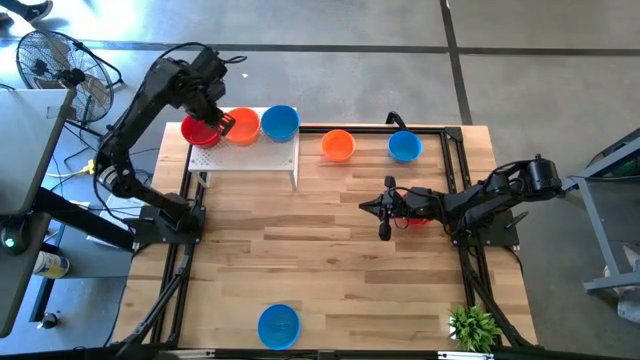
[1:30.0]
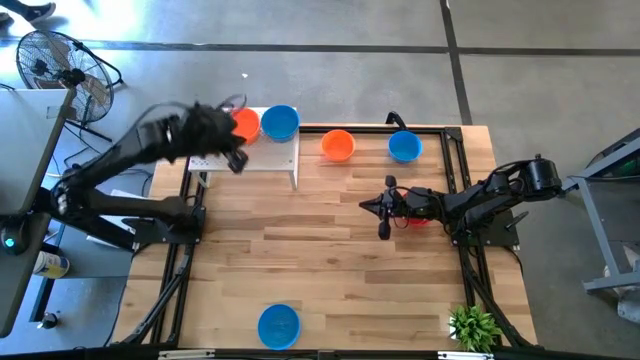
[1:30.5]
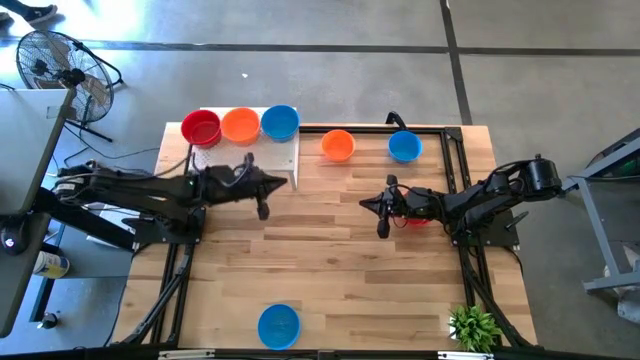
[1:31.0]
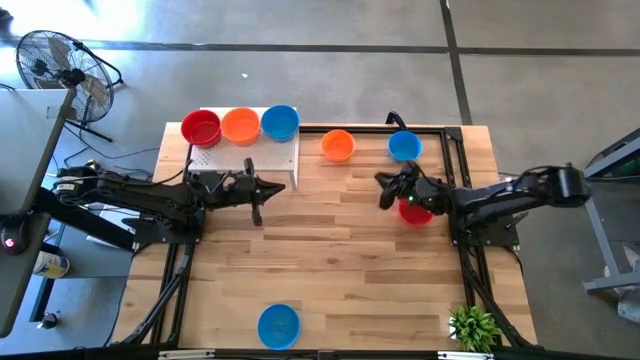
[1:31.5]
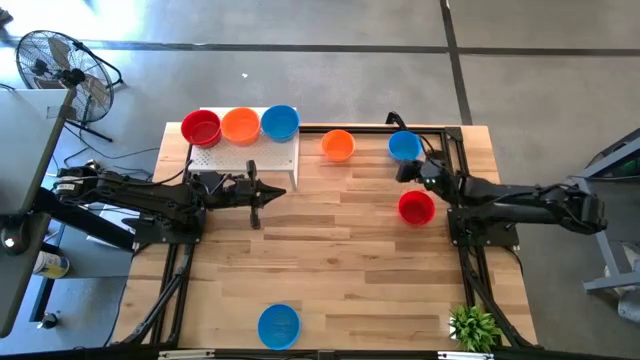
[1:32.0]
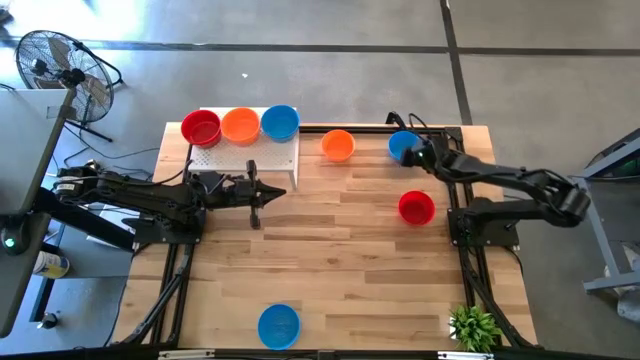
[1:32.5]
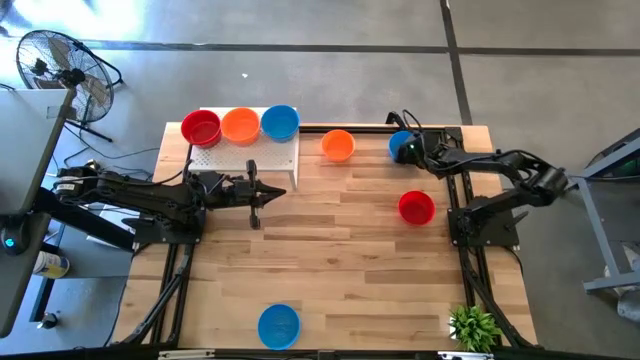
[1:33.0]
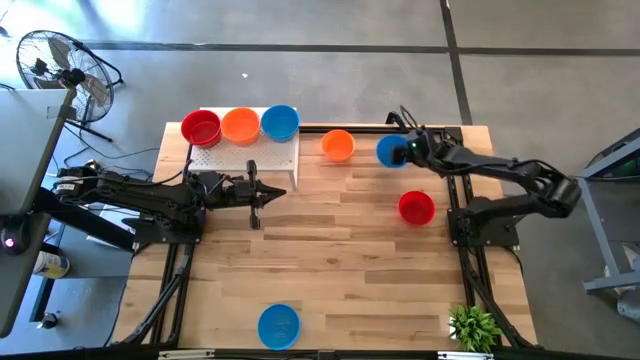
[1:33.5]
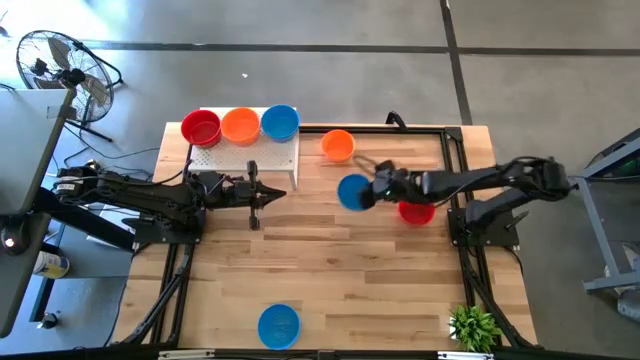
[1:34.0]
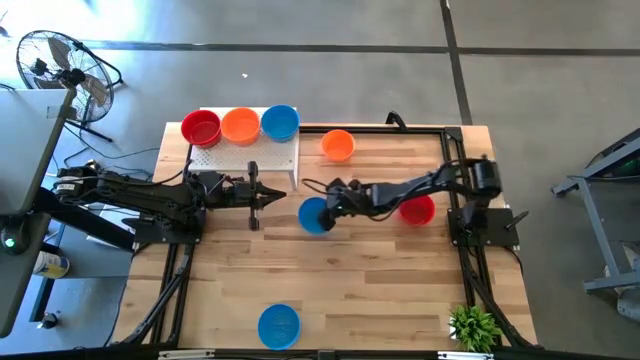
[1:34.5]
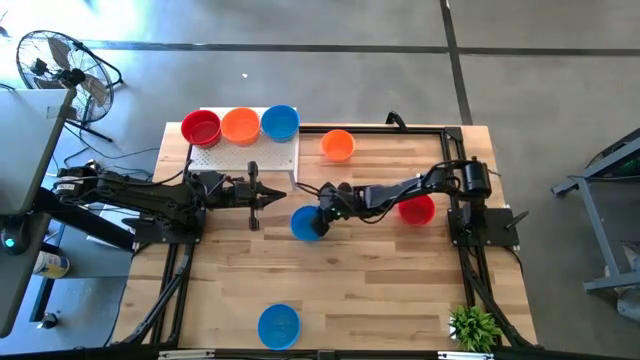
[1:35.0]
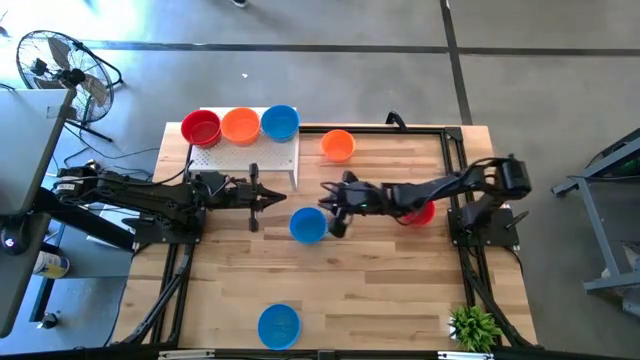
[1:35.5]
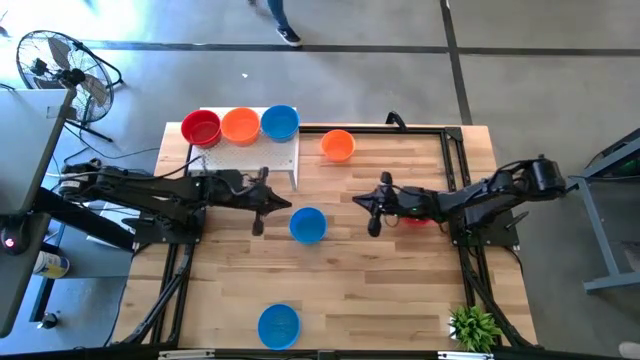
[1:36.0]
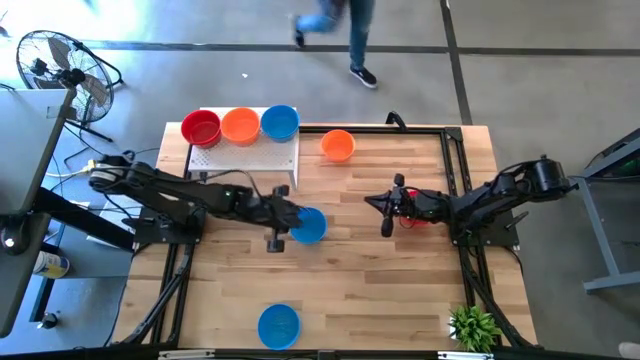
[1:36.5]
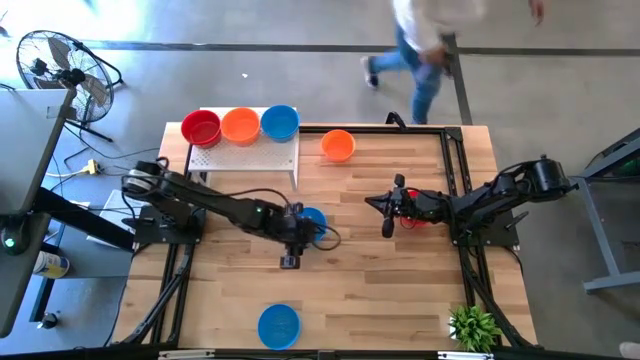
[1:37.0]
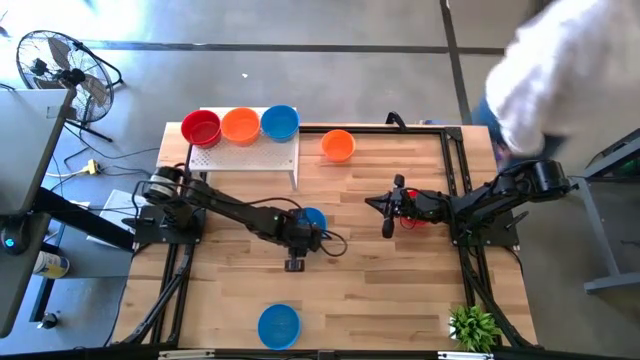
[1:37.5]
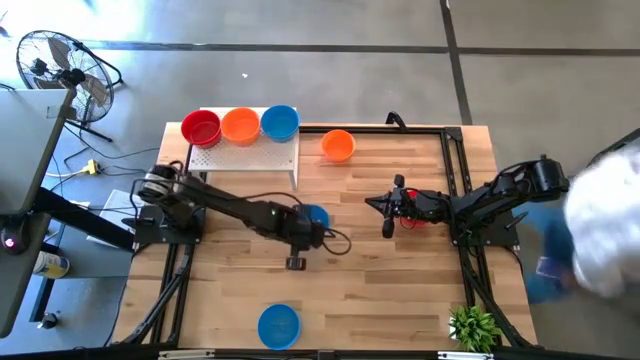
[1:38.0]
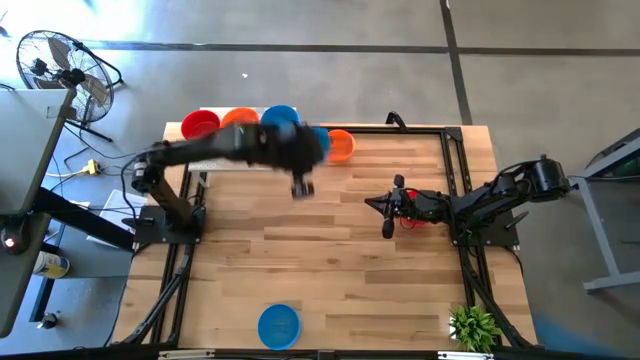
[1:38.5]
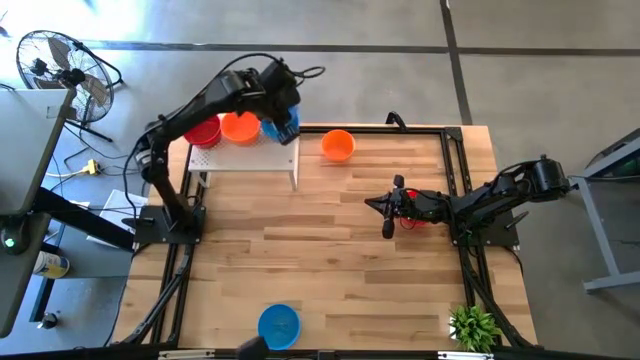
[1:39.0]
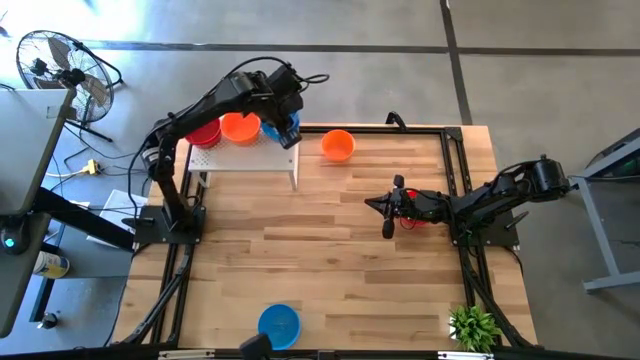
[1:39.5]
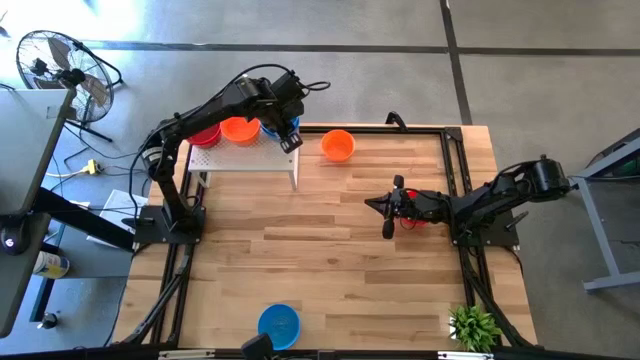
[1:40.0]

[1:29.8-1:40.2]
Task: Pick & Place Mini bowls
Stack the blue bowl on top of the other blue bowls on the shelf

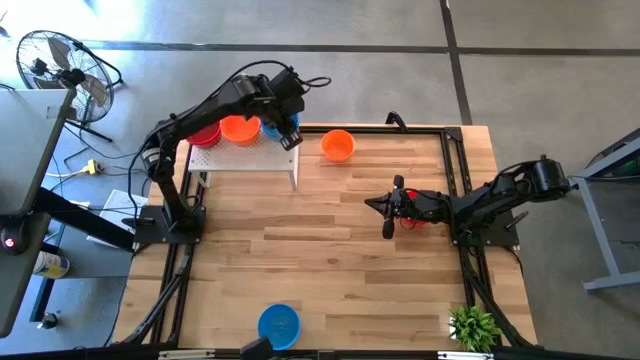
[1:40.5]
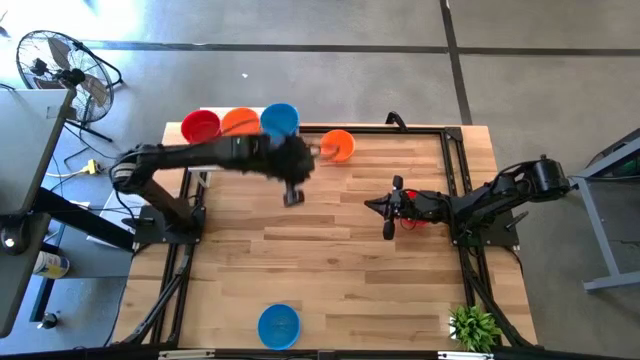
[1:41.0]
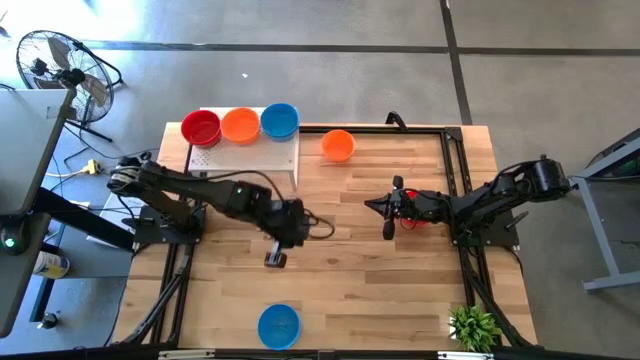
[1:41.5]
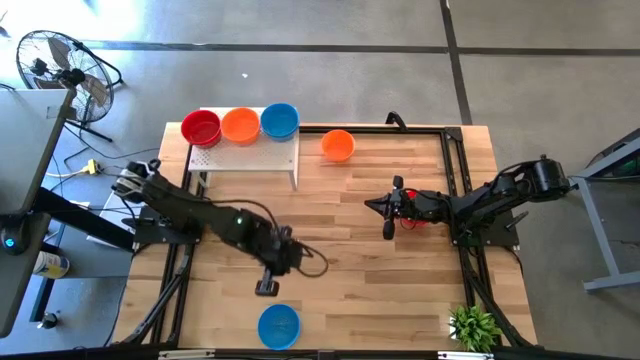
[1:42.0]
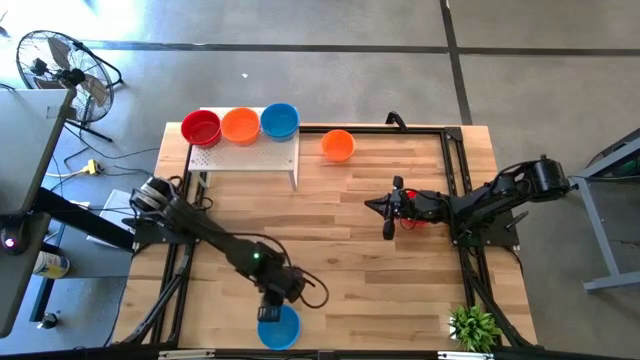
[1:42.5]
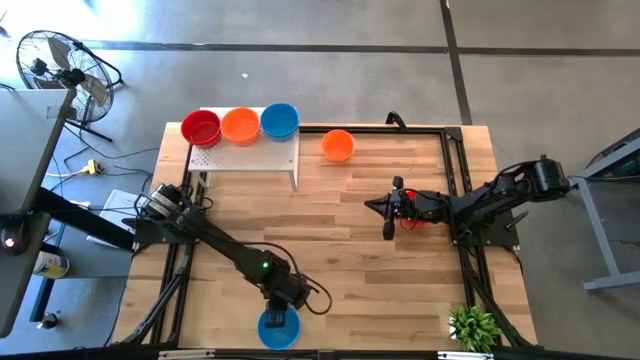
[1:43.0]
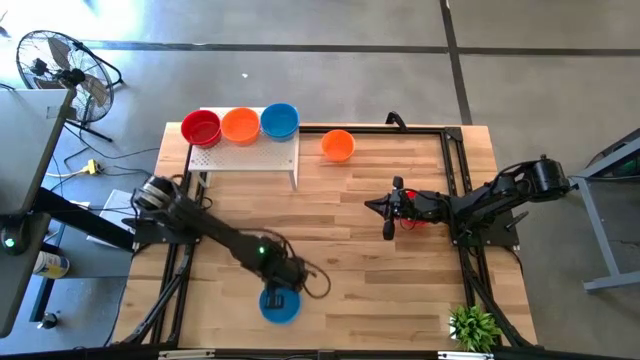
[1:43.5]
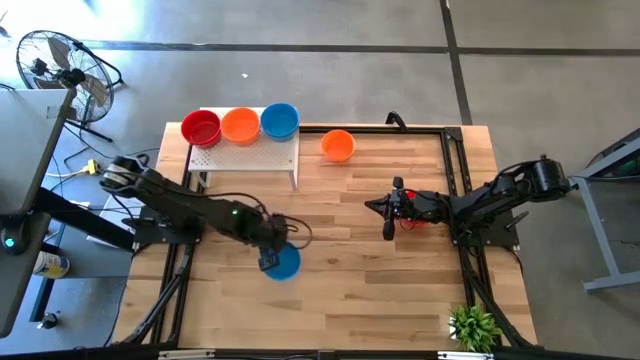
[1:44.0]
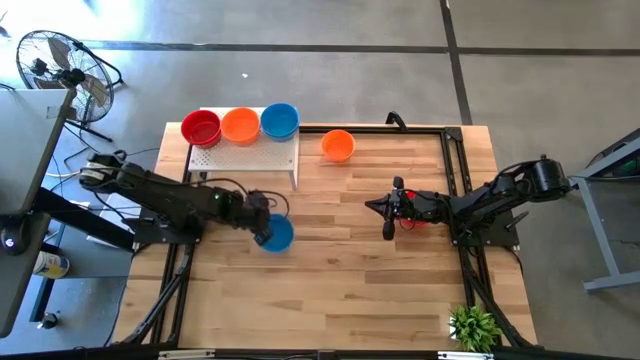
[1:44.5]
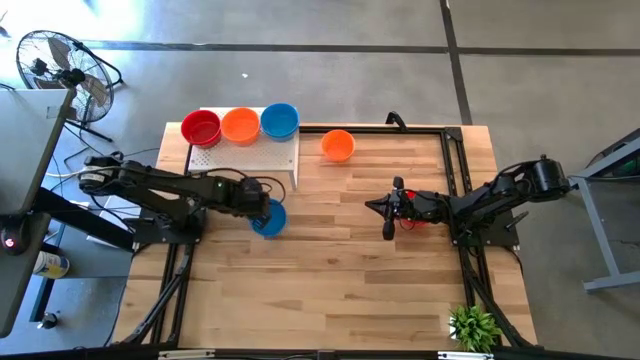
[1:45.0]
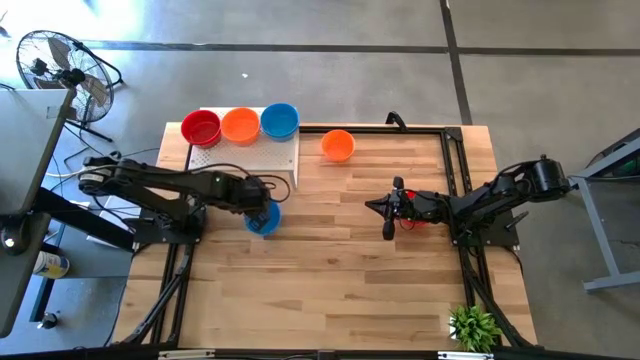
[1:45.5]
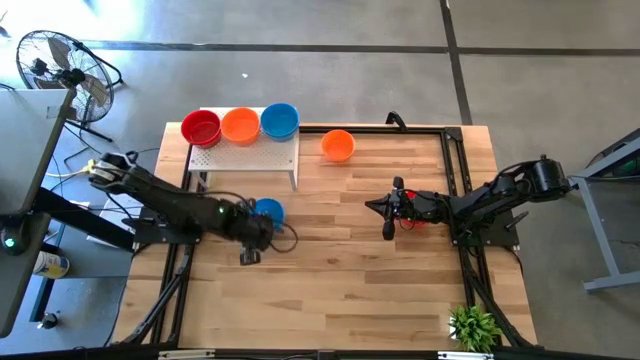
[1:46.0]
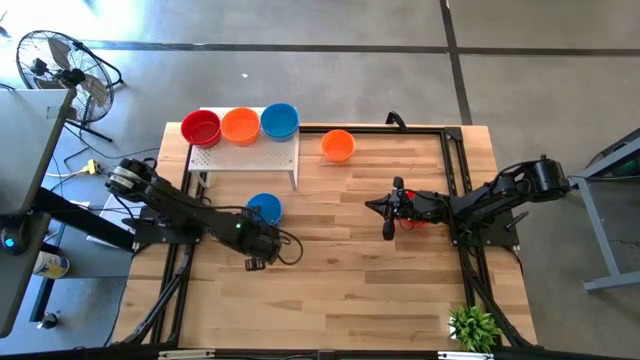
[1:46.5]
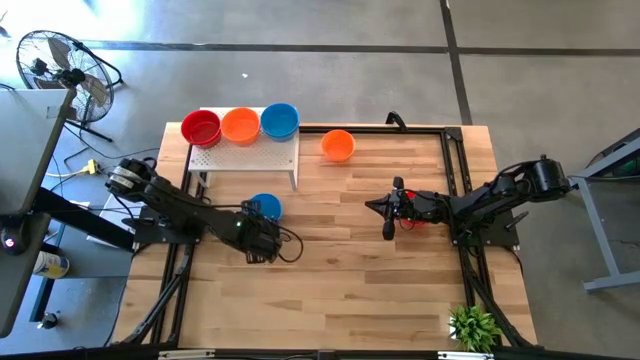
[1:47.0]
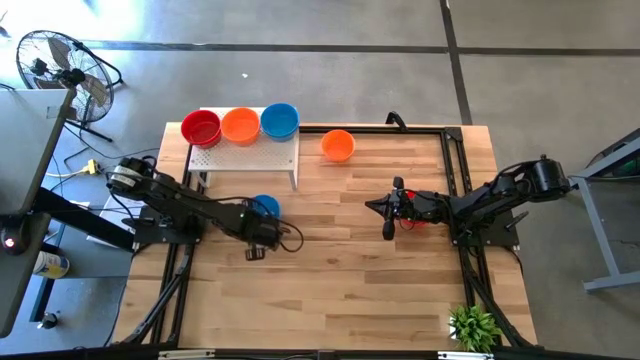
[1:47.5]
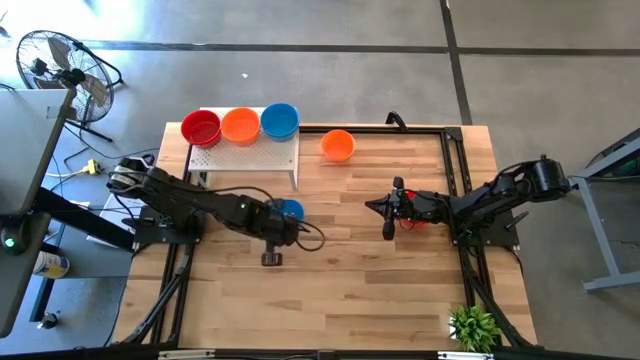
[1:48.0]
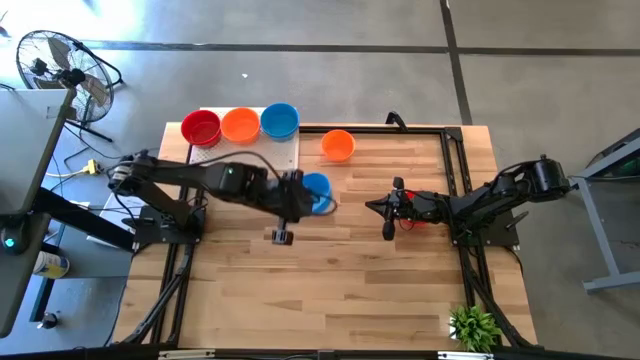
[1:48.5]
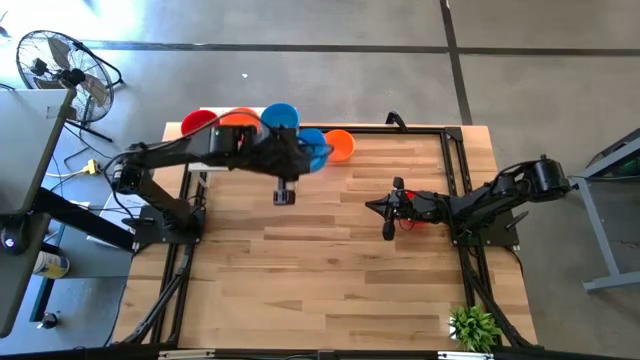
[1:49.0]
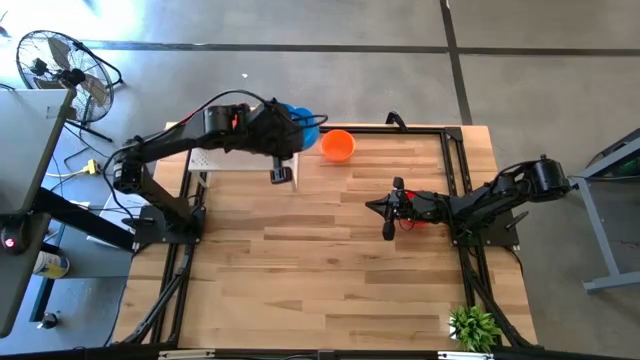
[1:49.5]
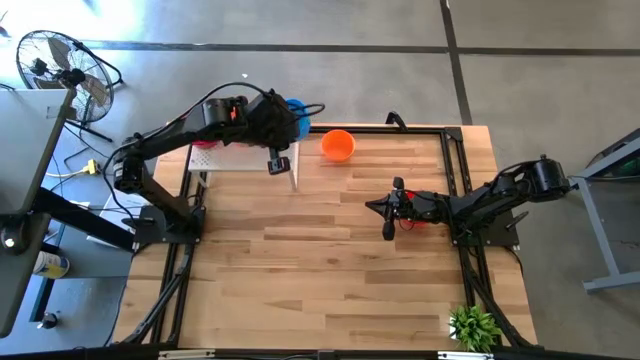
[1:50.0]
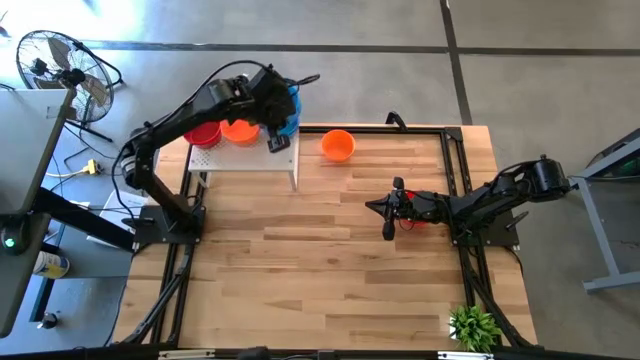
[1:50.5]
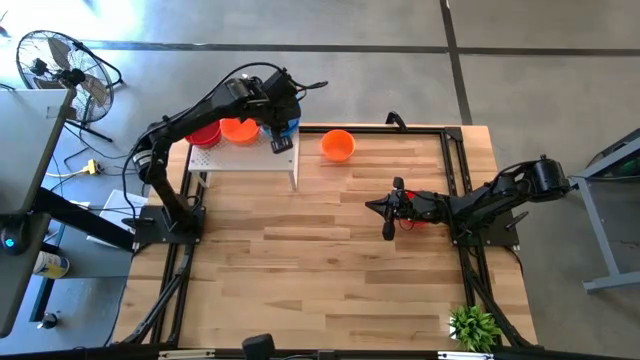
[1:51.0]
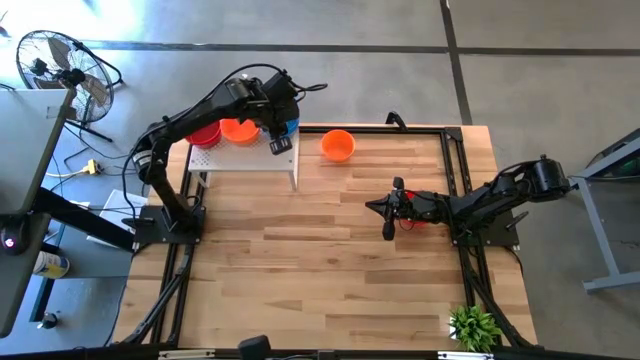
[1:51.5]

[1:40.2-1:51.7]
Stack the blue bowl on top of the other blue bowls on the shelf
